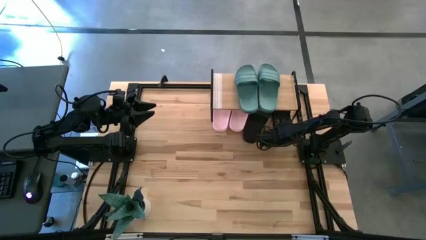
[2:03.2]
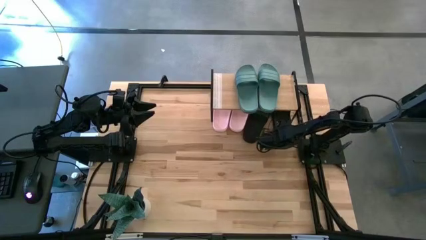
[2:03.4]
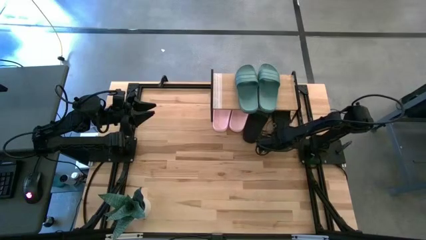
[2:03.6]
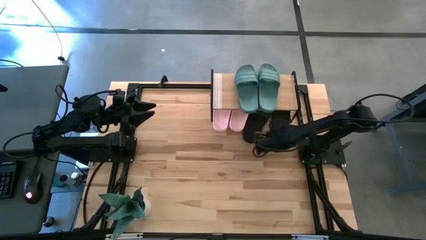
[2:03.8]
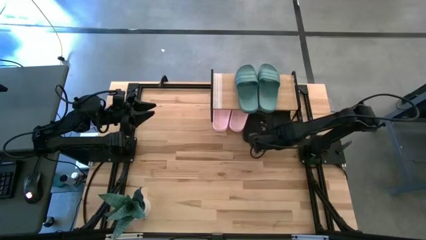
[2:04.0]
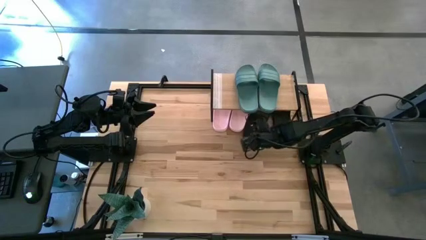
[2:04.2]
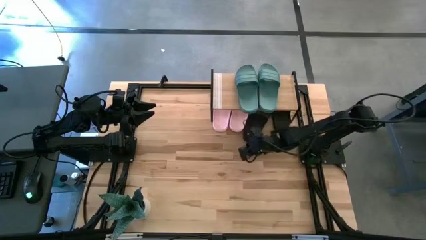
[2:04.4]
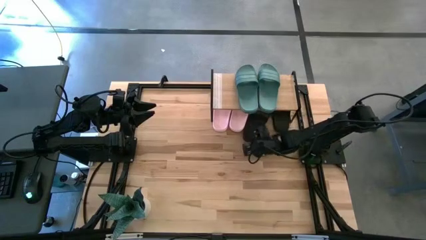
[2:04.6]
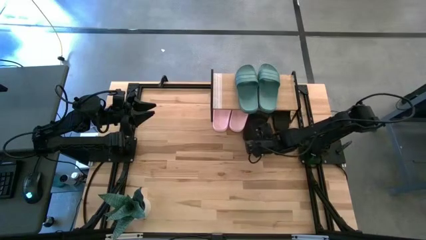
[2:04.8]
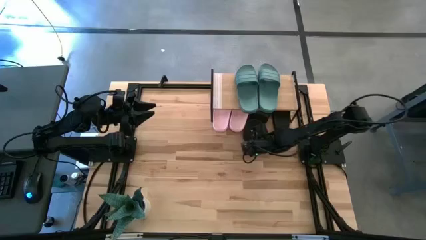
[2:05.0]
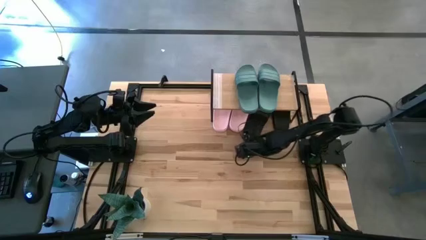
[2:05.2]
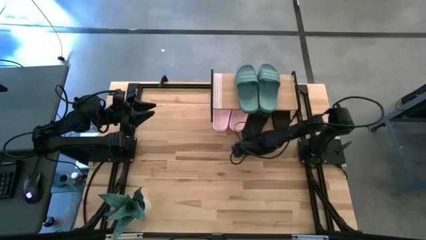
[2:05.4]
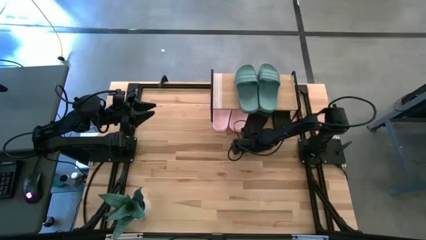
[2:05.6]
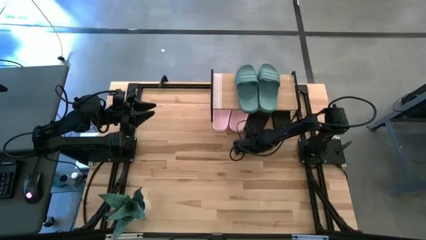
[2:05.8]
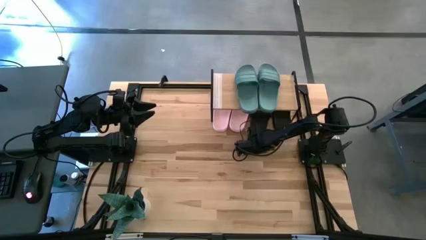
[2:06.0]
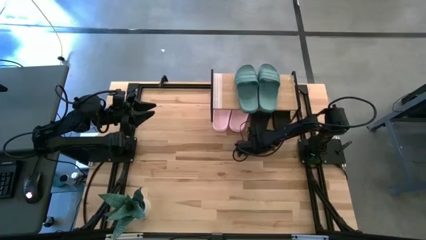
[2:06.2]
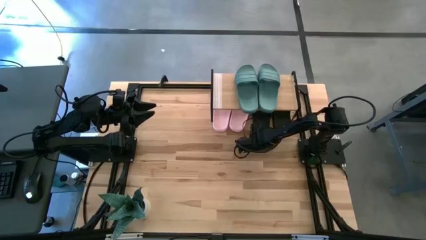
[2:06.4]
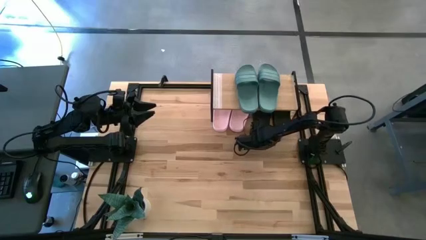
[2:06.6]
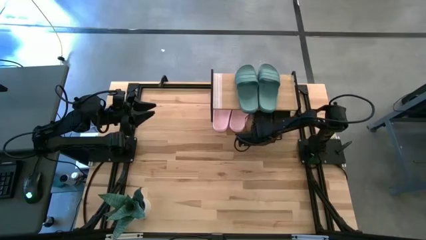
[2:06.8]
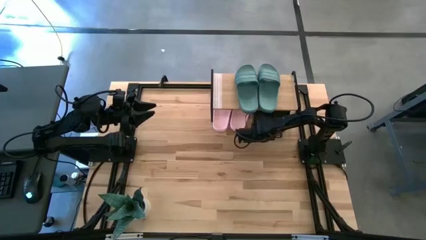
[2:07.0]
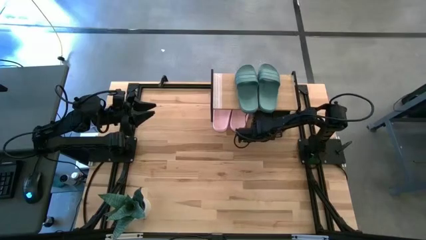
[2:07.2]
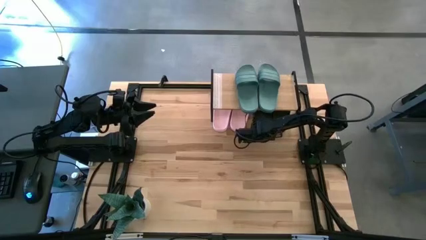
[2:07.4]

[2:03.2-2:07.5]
Task: Pick and place slides into the shelf
Adjust the left black slide under the shelf

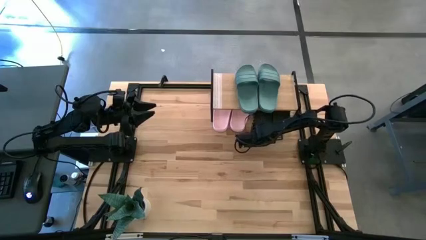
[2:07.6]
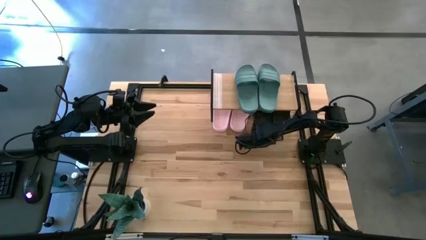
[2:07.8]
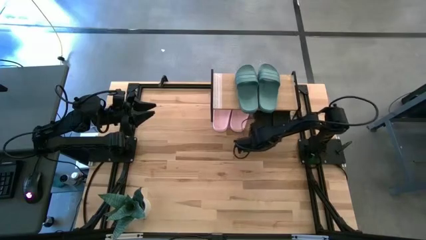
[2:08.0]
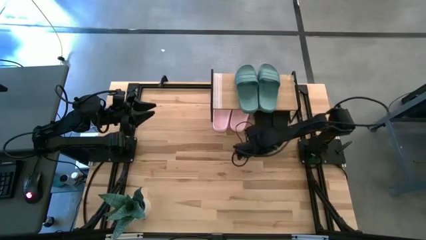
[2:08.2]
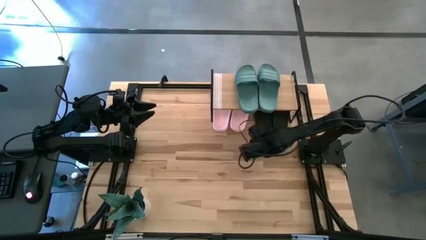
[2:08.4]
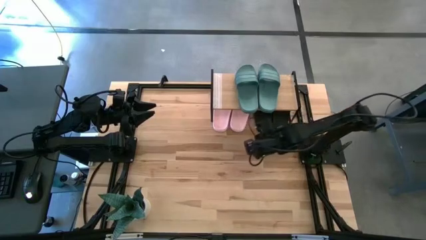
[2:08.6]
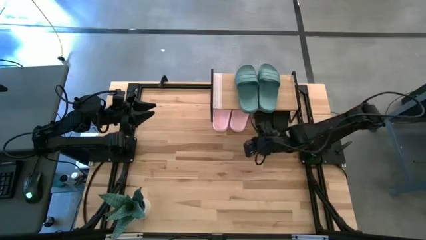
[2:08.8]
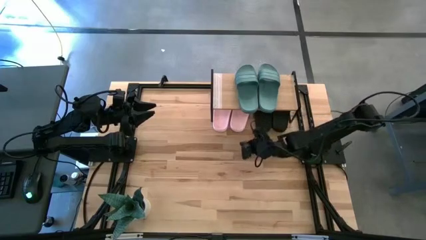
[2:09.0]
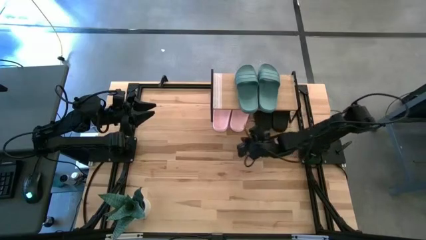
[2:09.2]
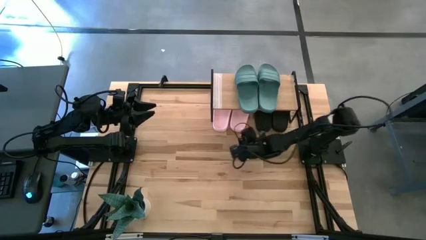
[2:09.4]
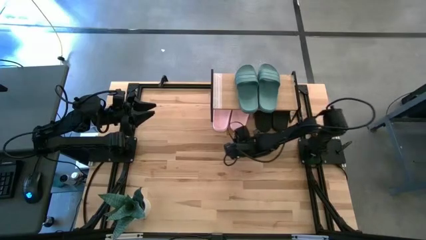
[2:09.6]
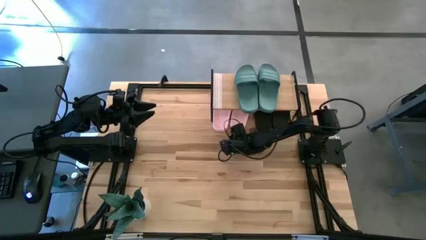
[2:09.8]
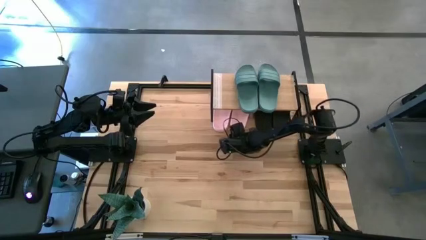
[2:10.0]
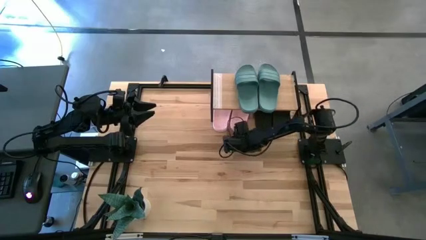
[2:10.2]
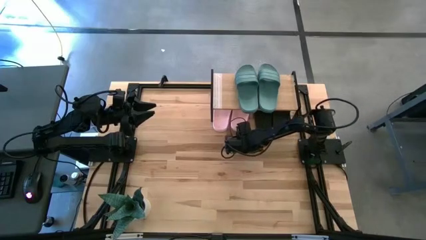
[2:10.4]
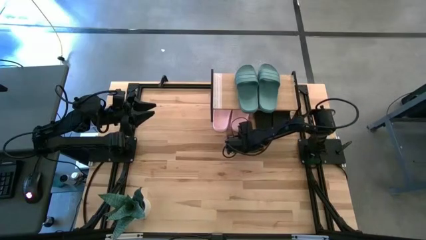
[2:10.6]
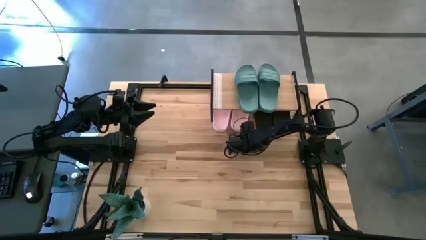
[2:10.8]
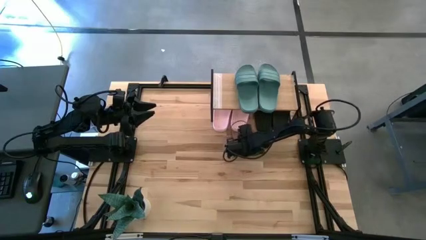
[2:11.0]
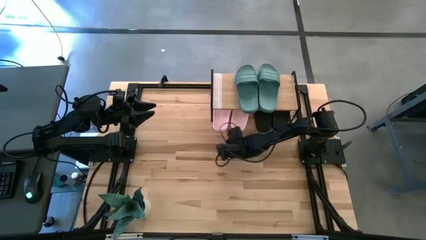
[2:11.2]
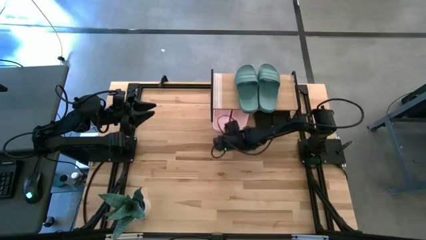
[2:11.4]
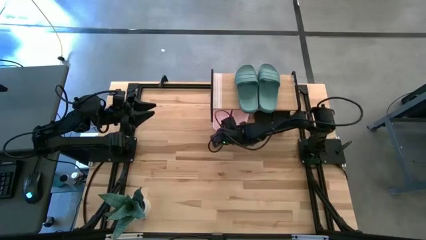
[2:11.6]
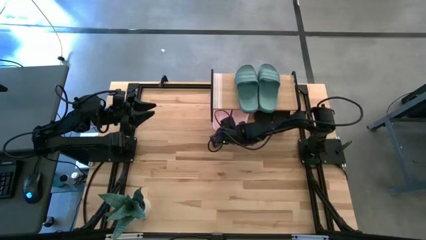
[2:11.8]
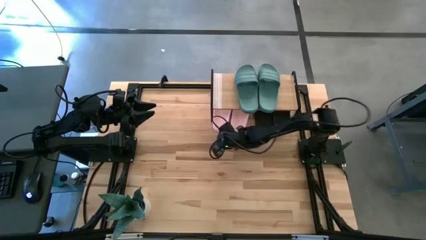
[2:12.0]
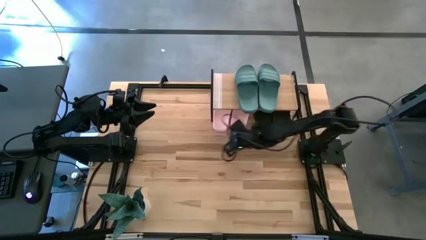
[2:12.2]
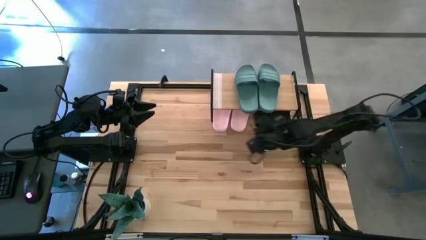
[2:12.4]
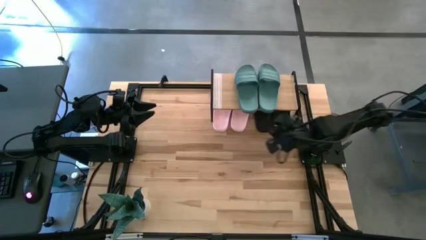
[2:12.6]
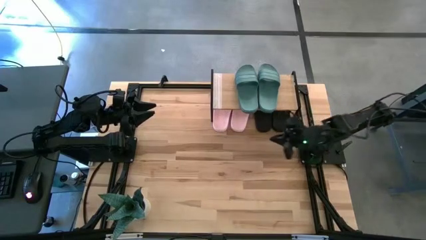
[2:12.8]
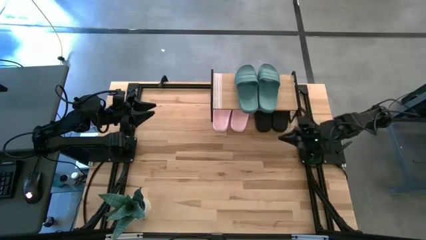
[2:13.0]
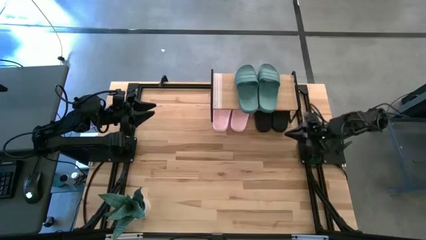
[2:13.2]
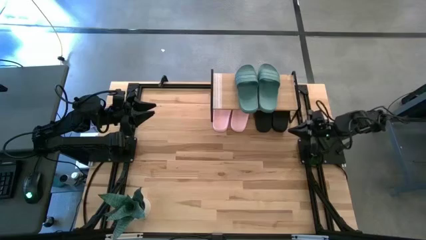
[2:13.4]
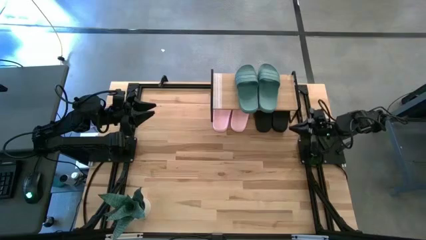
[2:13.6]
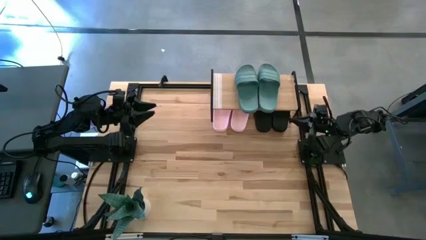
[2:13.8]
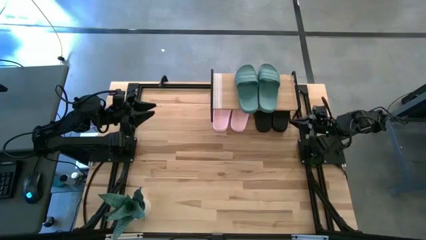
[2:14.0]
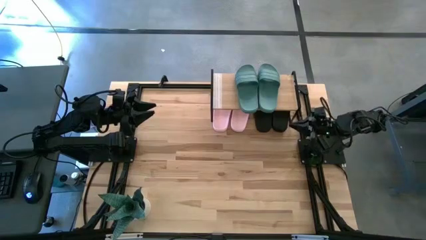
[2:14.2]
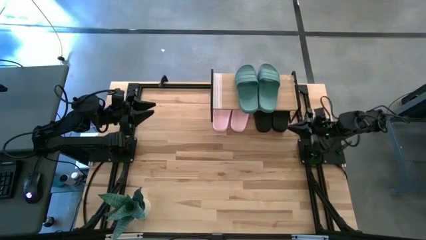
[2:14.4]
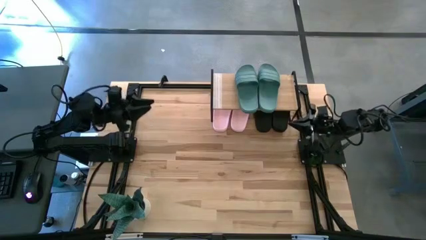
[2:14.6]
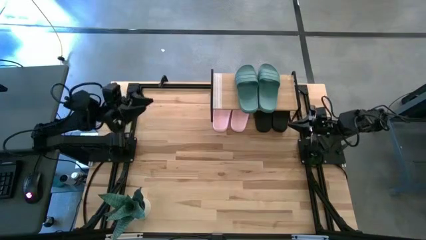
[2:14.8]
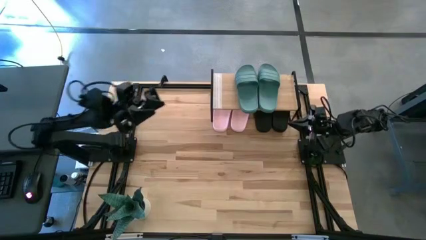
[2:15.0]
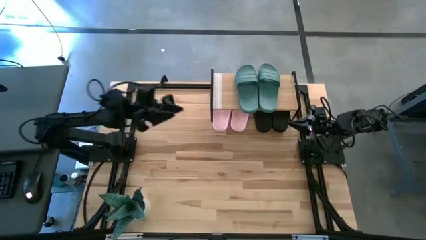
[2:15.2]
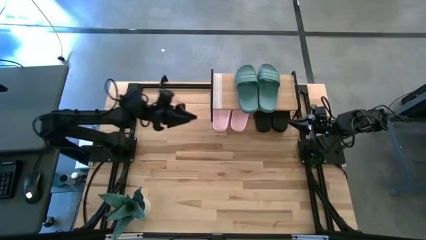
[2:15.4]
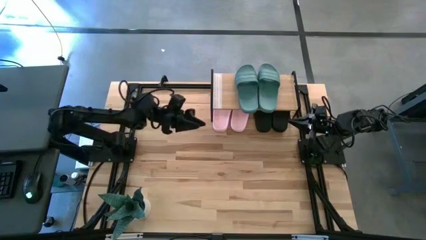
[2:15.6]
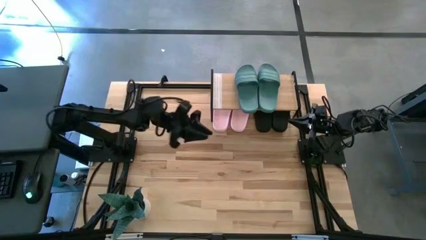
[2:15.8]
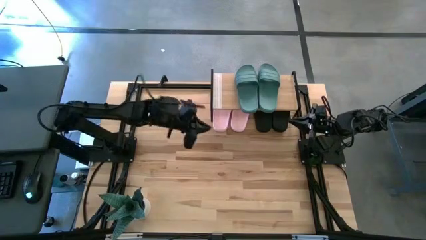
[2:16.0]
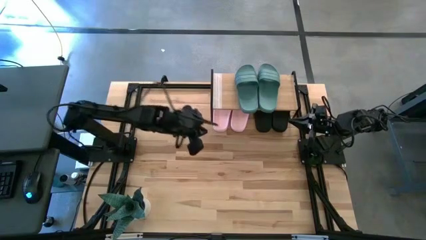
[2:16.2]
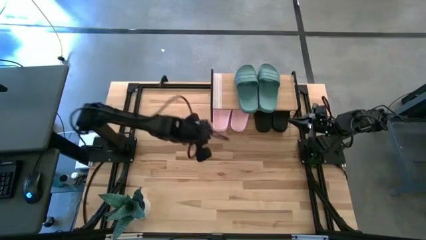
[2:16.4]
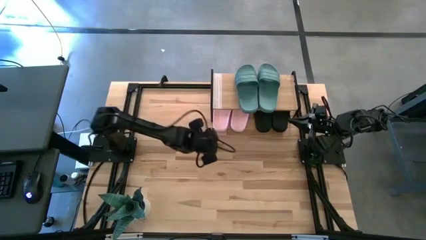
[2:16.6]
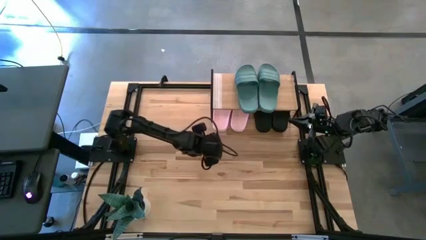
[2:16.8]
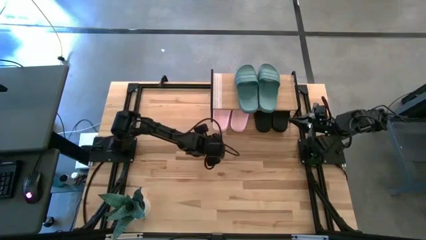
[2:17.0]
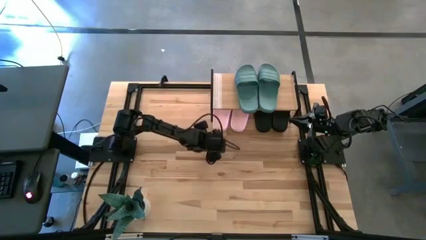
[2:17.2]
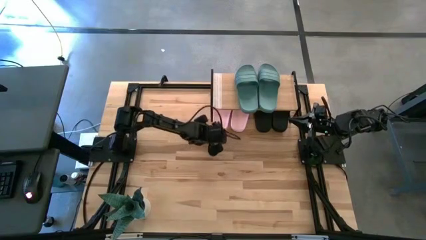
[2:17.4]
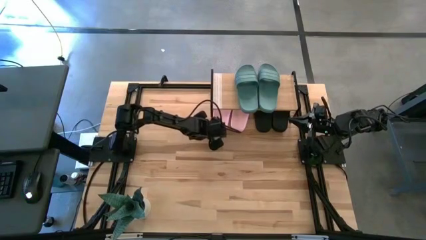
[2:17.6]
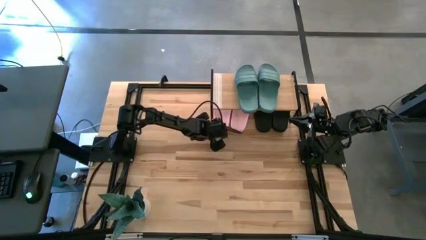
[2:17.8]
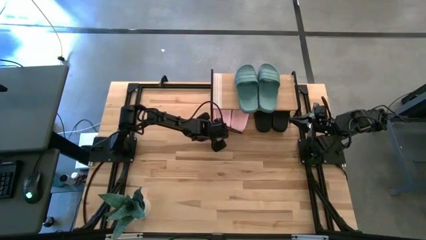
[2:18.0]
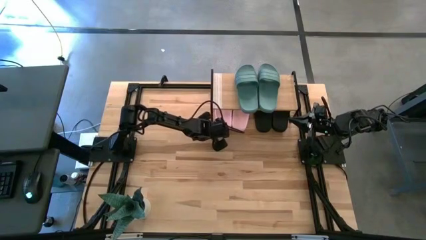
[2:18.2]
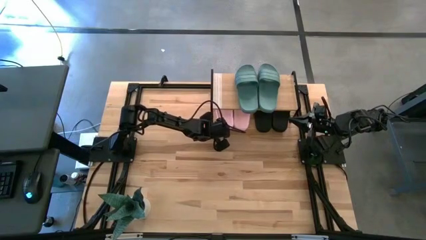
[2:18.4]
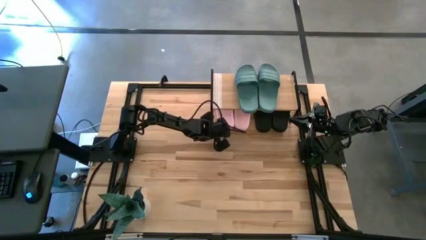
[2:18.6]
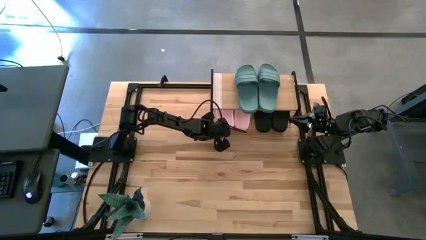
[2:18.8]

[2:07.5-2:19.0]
Adjust the pink slides under the shelf
